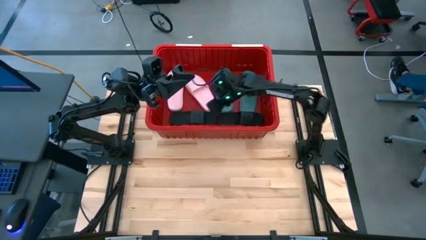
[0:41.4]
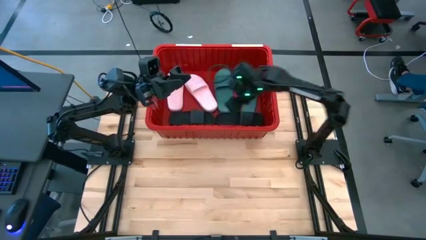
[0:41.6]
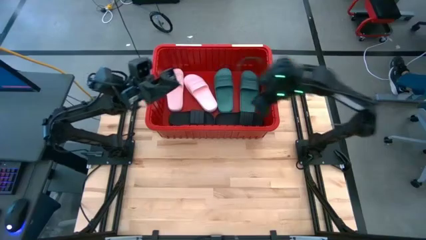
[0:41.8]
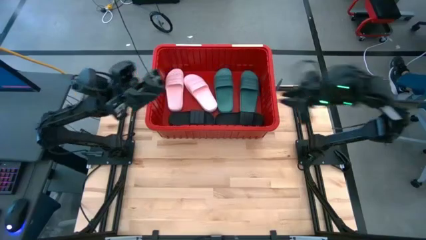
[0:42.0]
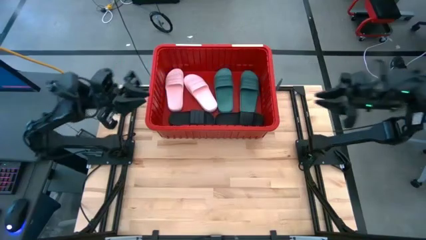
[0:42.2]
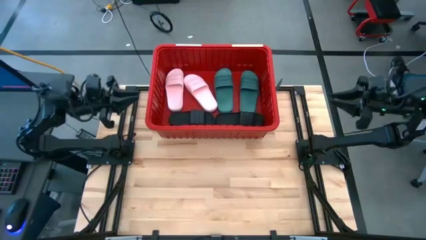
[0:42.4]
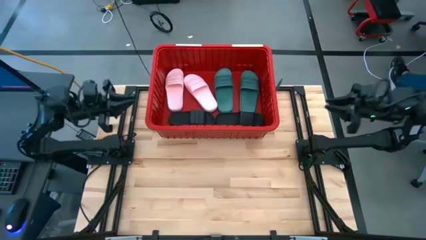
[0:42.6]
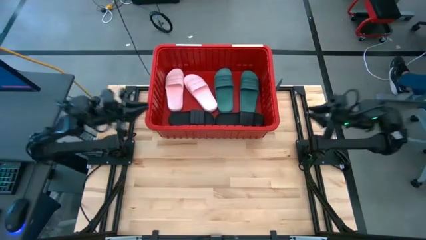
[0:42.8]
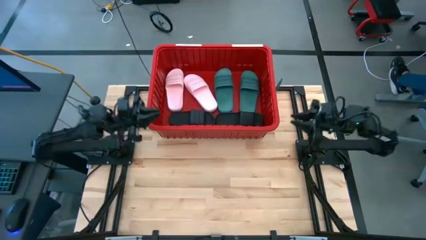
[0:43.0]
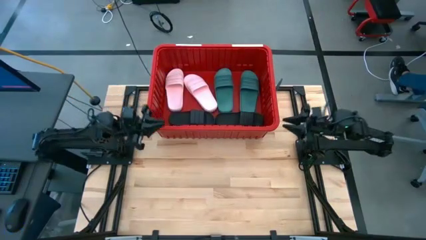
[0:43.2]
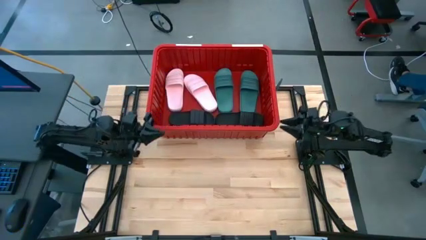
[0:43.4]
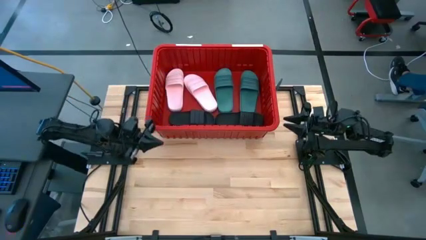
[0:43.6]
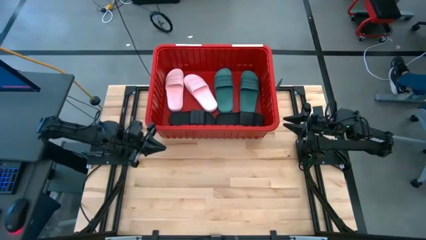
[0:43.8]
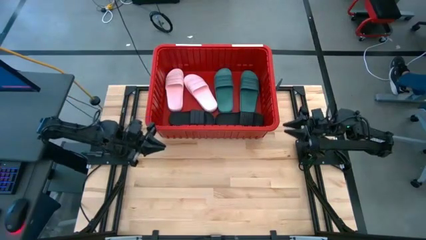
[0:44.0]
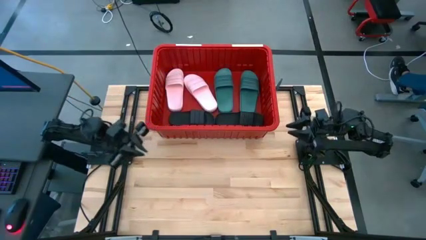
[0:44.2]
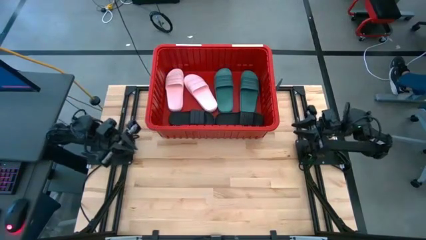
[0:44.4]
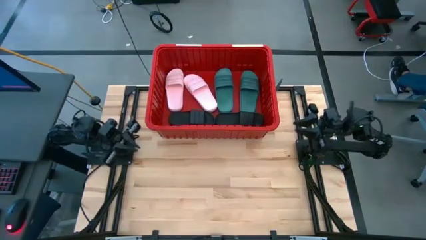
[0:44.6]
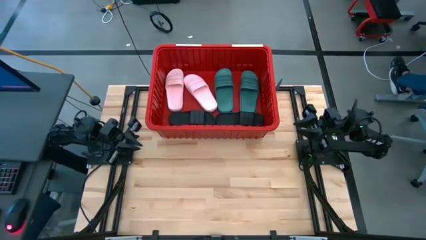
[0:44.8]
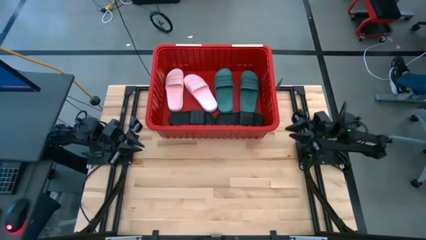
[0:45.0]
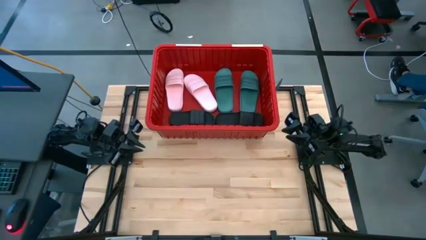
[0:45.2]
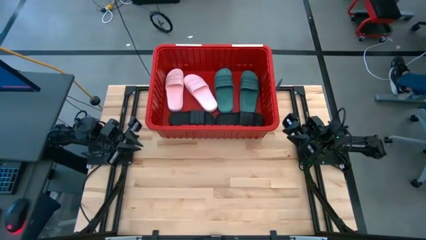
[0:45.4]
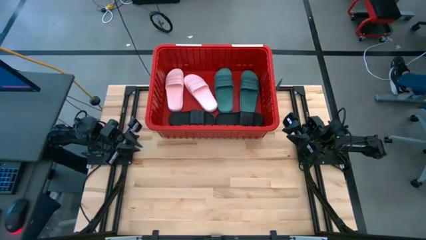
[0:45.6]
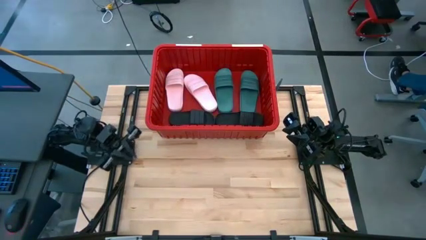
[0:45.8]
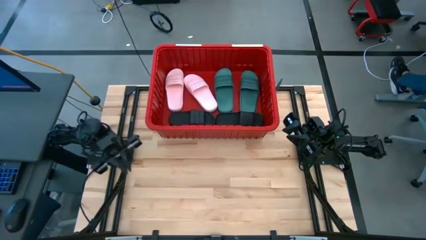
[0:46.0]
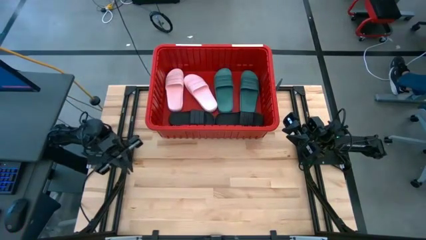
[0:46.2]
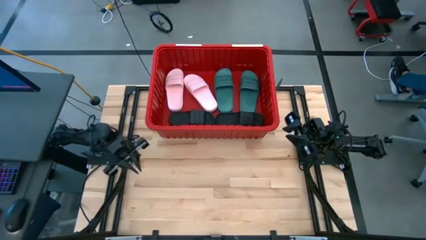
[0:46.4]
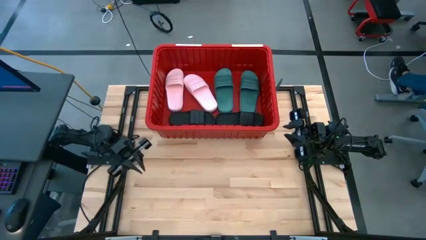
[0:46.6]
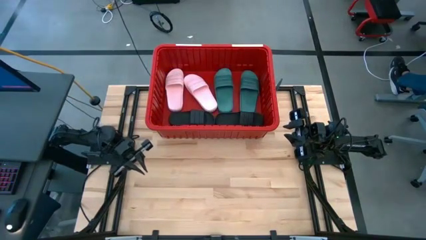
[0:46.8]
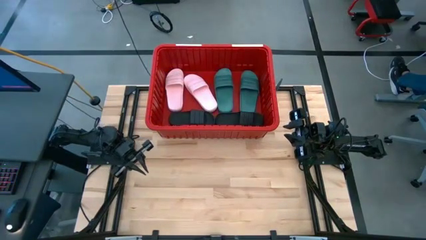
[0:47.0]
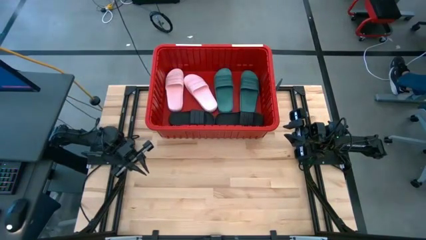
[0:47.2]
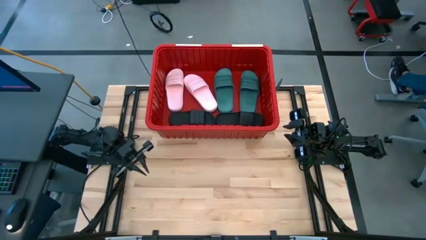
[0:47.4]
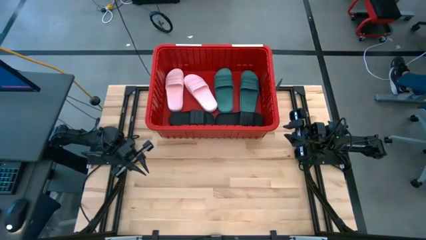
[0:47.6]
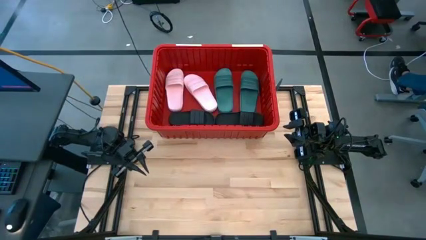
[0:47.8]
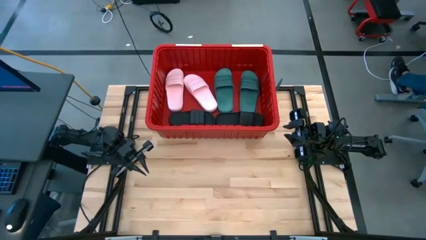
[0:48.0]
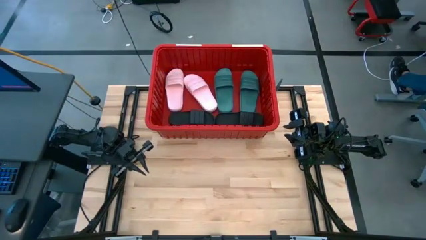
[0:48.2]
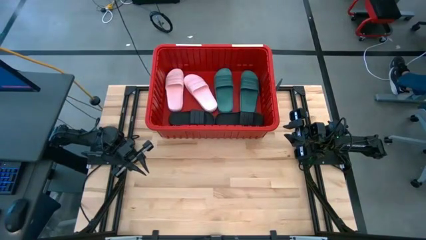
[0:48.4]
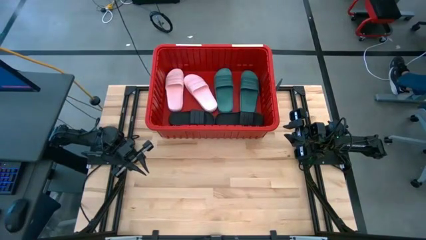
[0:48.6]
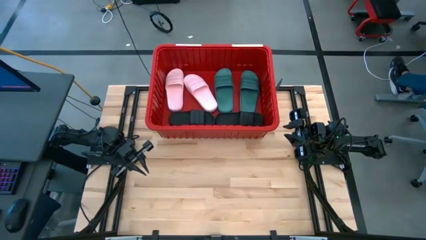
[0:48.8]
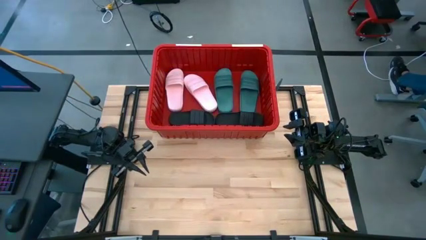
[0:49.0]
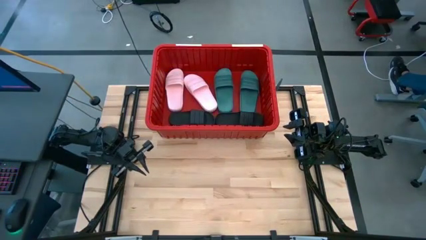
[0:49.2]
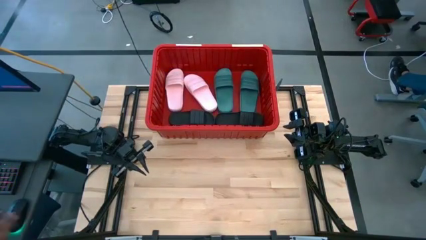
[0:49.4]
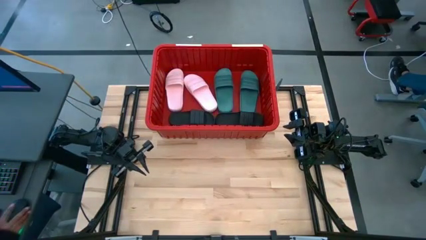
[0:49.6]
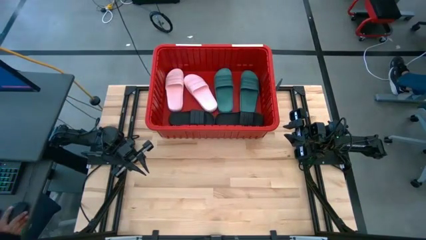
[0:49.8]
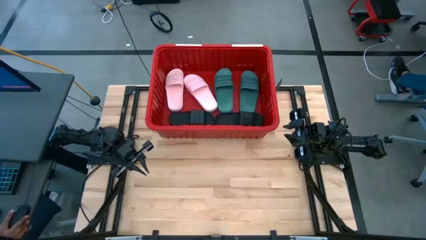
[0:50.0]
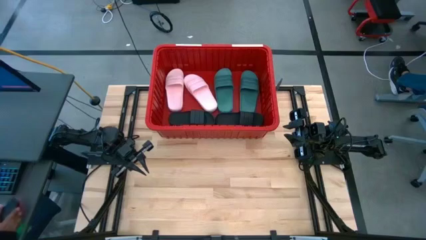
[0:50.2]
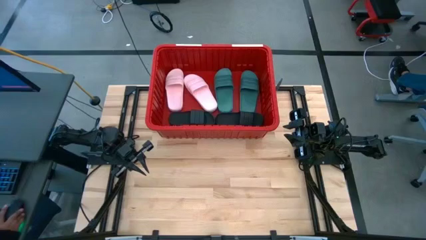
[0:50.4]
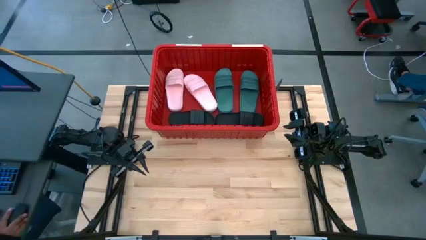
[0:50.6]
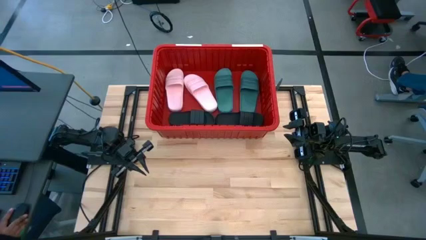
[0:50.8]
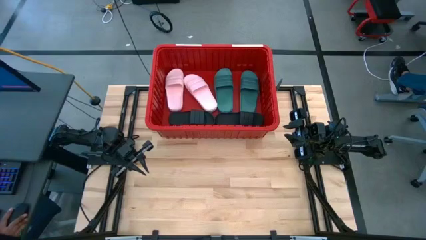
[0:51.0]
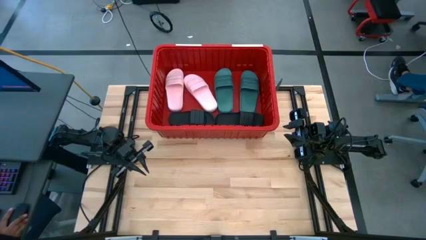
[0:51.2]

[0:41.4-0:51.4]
Task: Pick and place slides into bin
Return to Home Position

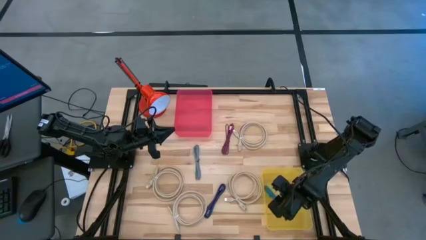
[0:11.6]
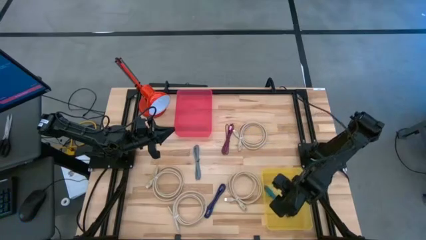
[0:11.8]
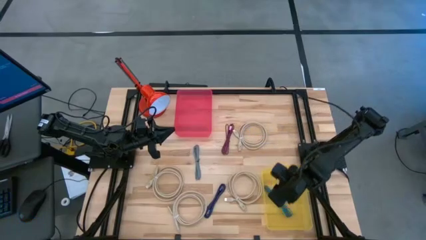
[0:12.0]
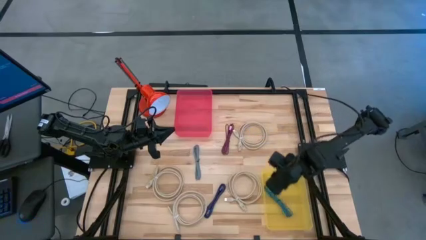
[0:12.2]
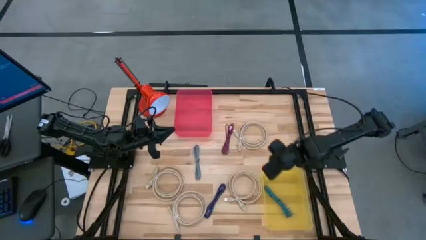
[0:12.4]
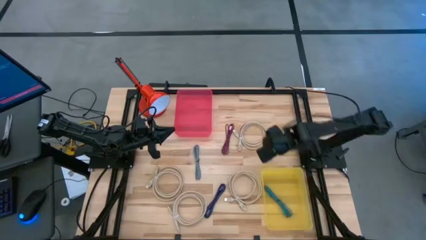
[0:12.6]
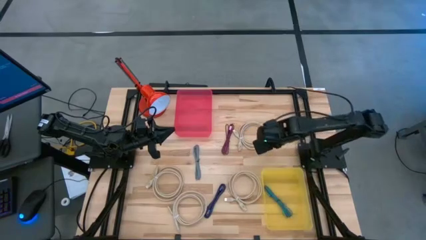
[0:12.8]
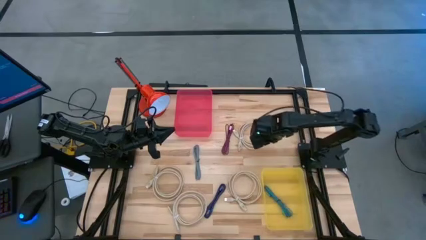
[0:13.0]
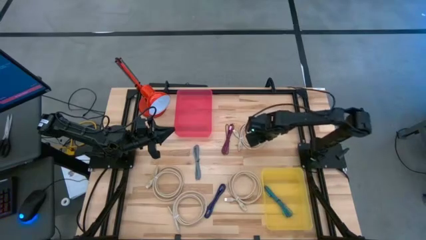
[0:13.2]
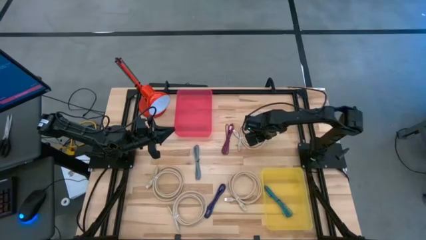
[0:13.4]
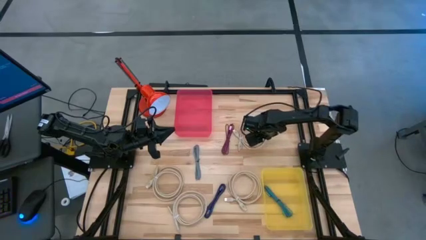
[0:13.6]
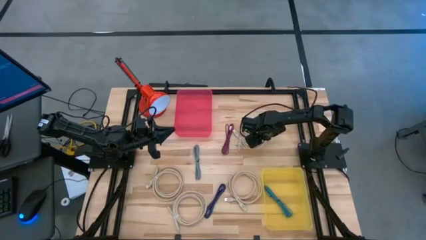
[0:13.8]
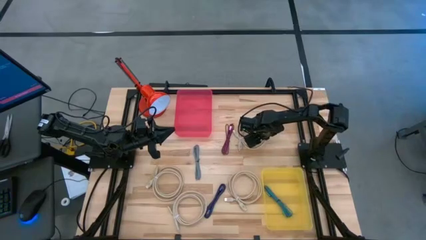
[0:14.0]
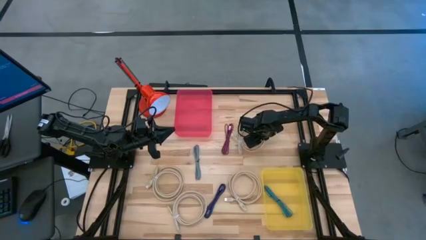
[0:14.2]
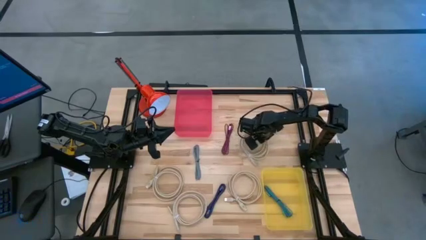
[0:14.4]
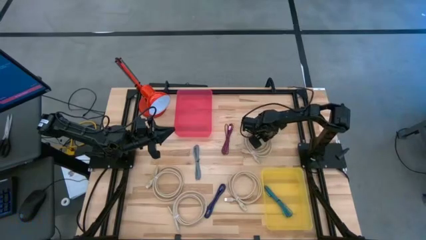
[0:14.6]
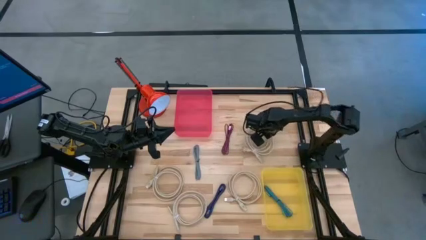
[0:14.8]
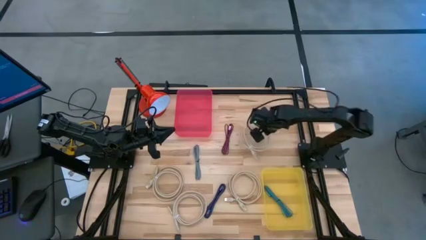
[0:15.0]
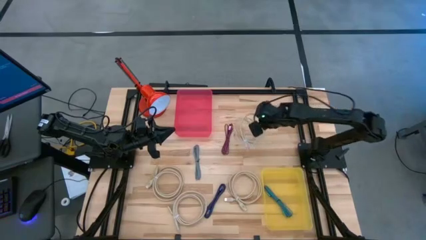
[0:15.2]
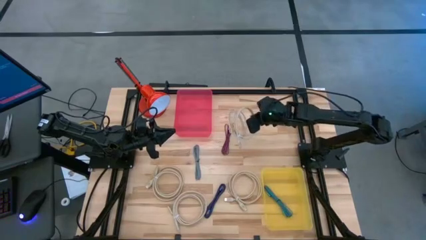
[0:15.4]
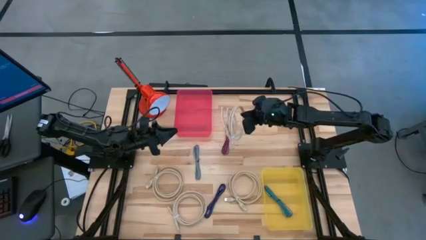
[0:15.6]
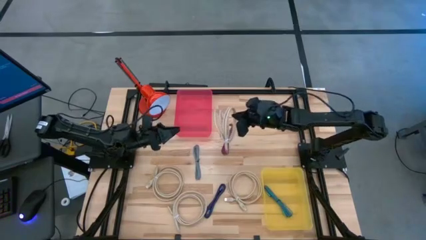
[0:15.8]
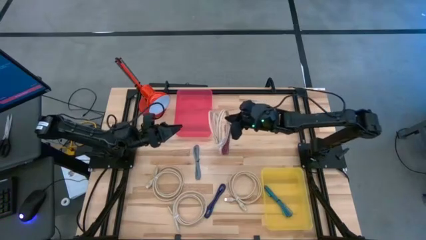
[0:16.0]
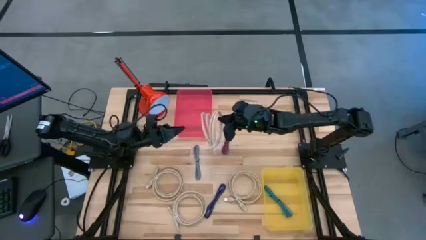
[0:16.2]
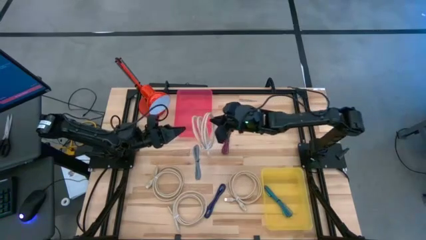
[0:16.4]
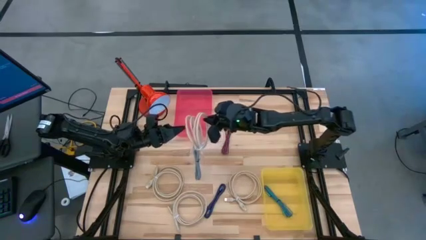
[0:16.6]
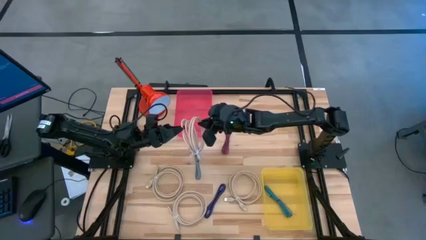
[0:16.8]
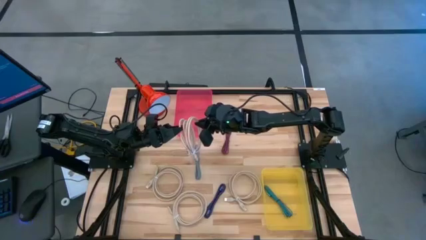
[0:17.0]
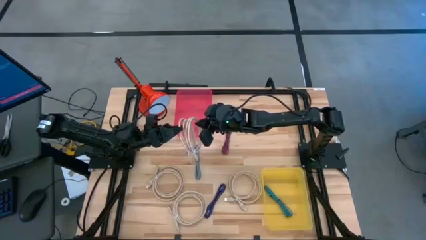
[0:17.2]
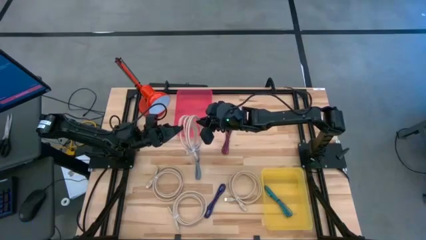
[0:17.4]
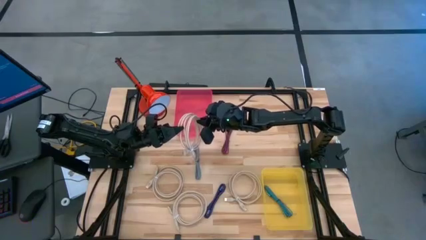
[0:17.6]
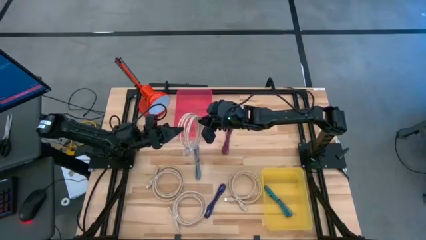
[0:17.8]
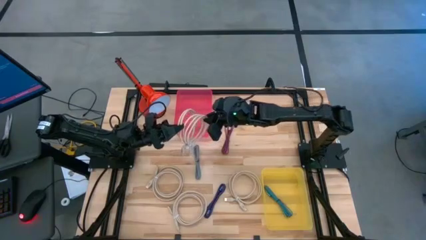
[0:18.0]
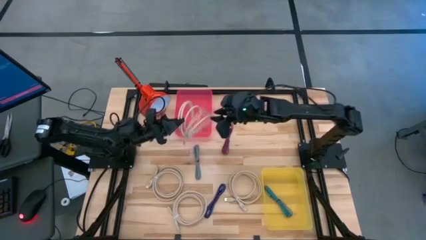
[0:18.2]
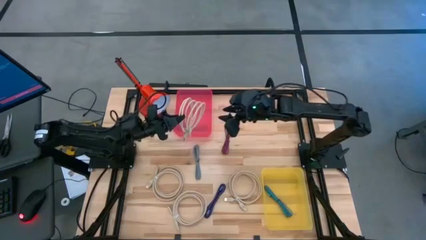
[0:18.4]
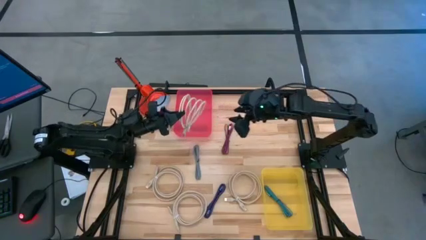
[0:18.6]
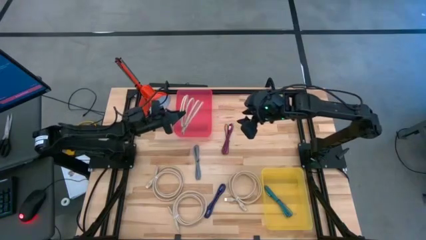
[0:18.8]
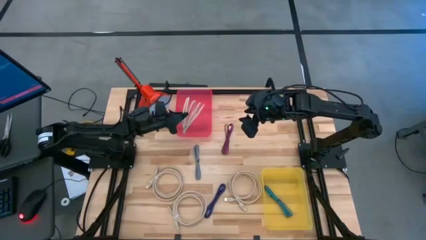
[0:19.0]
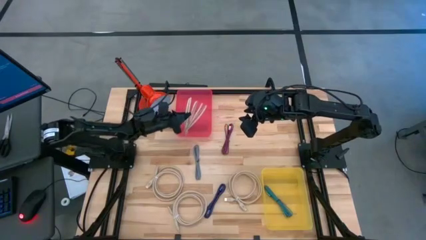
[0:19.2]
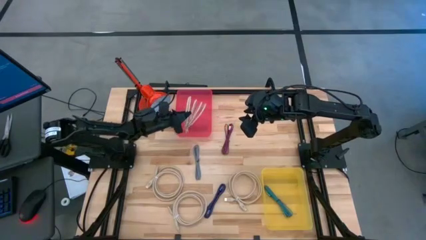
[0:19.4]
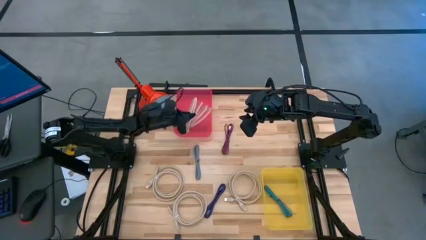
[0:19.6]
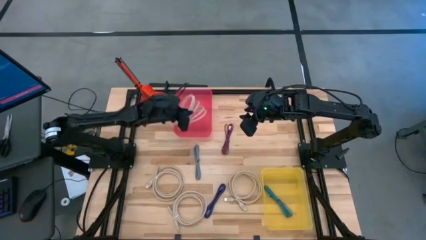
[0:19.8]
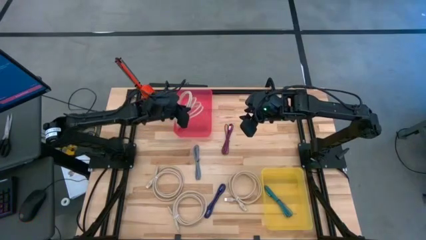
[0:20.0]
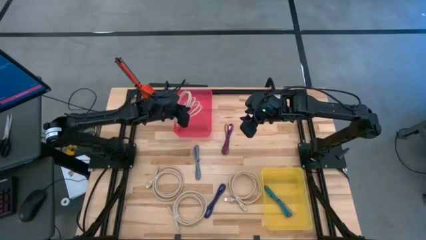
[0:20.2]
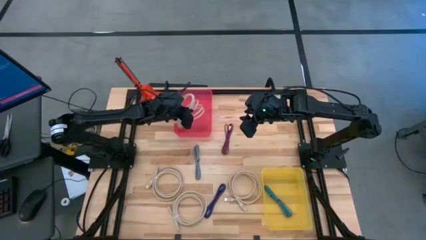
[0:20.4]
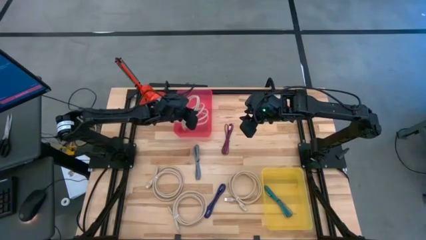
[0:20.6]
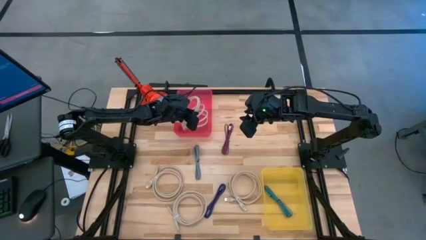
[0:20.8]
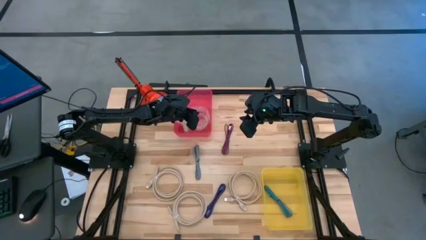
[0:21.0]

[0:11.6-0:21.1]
Task: Pick & Place USB Port
Put the HDMI cable into the red bin
